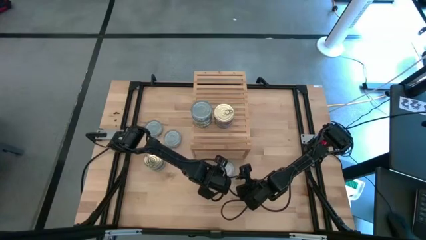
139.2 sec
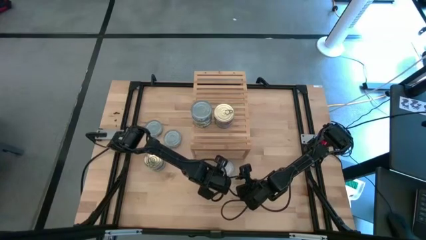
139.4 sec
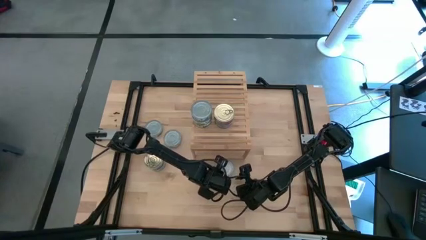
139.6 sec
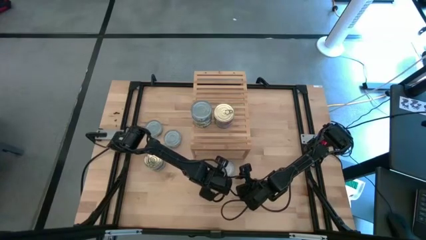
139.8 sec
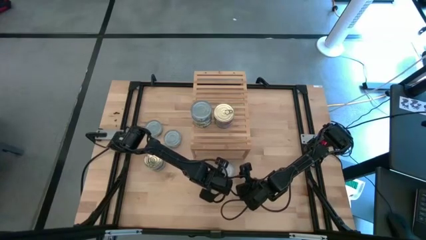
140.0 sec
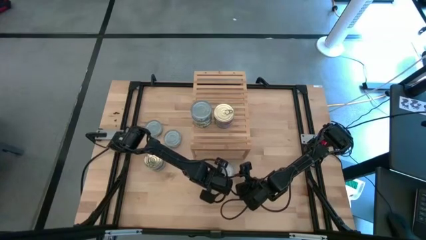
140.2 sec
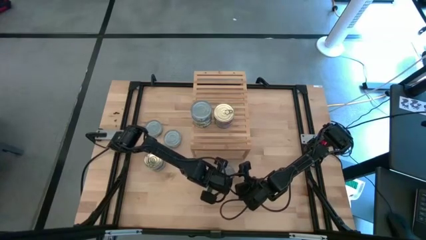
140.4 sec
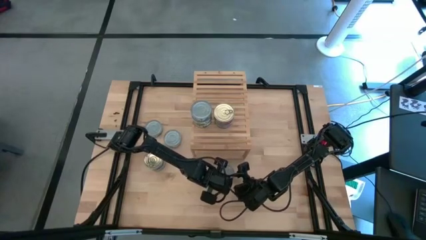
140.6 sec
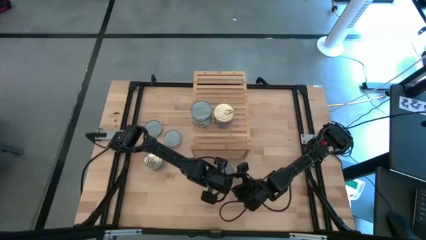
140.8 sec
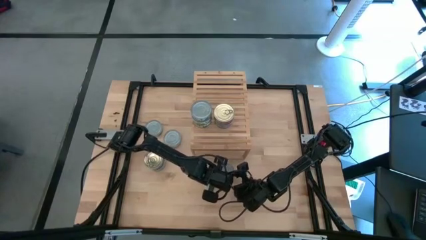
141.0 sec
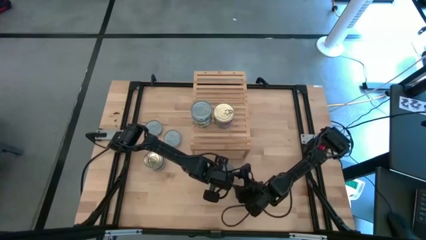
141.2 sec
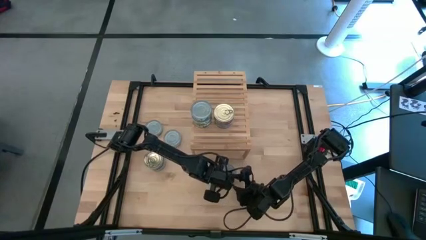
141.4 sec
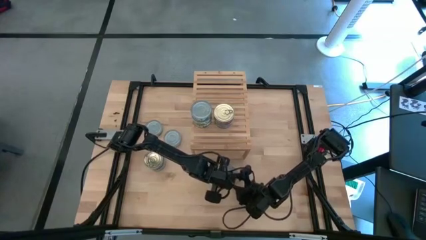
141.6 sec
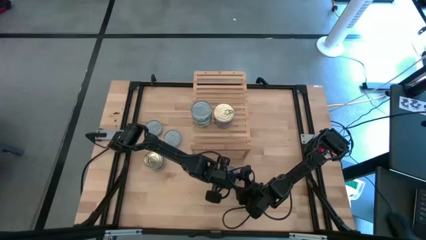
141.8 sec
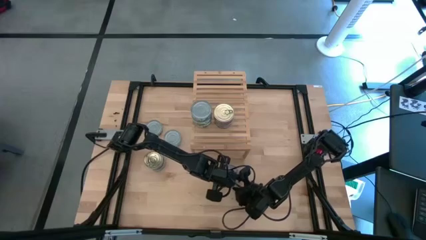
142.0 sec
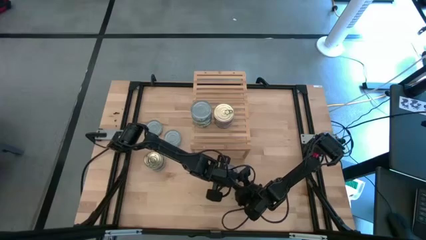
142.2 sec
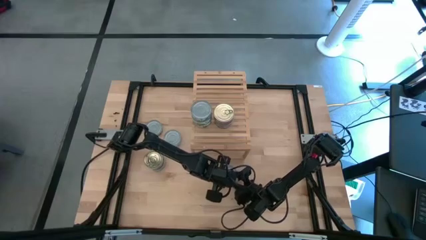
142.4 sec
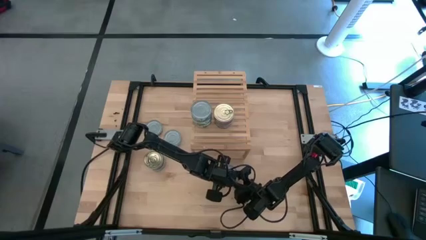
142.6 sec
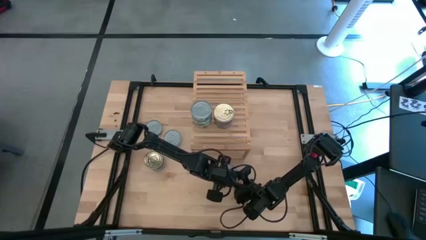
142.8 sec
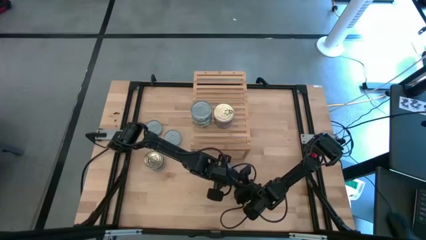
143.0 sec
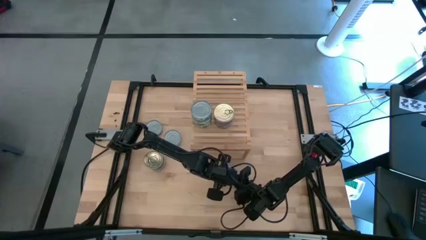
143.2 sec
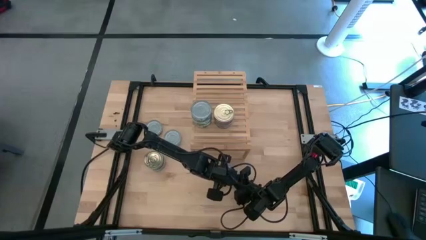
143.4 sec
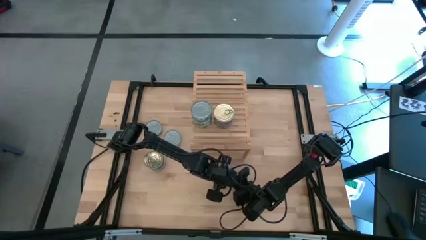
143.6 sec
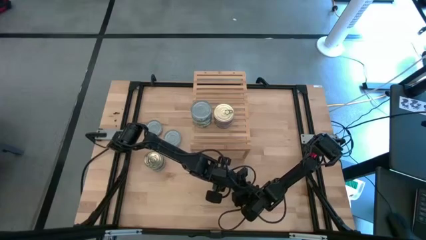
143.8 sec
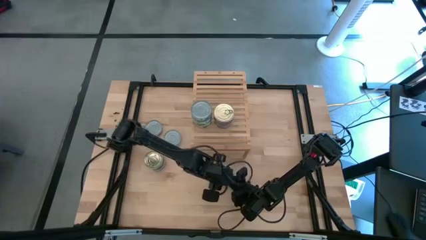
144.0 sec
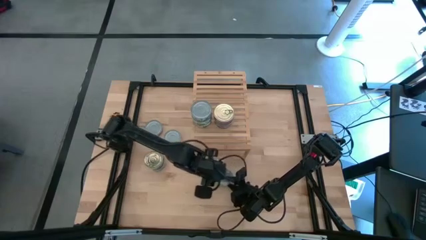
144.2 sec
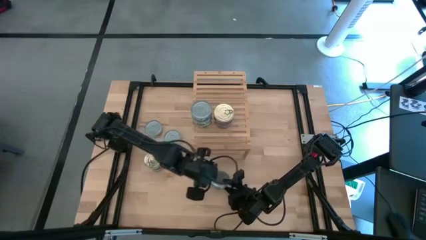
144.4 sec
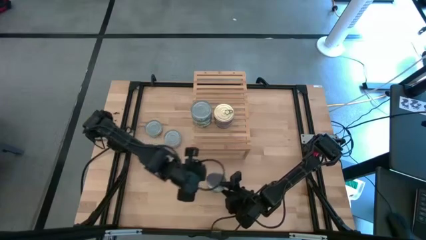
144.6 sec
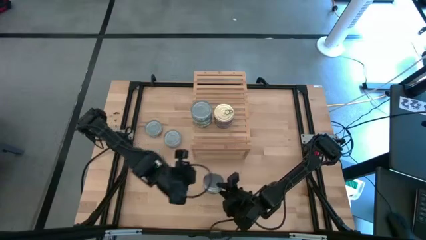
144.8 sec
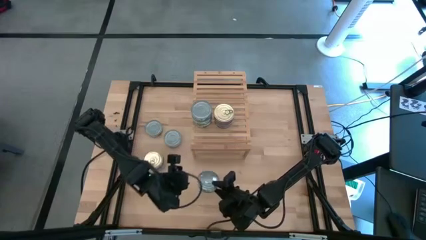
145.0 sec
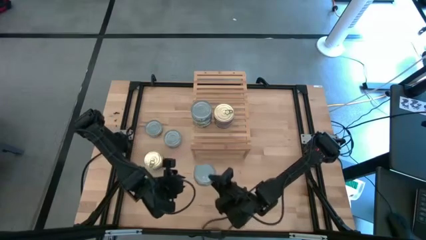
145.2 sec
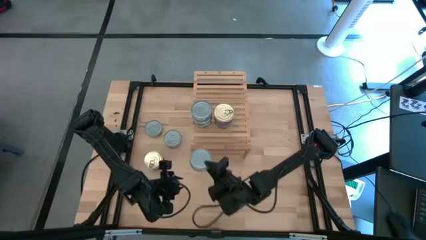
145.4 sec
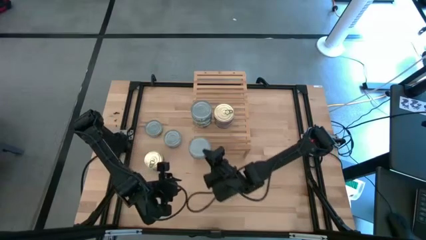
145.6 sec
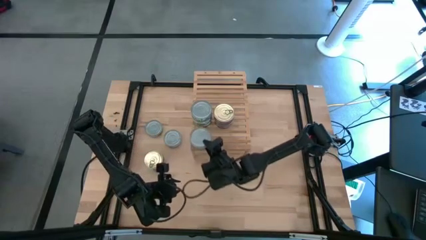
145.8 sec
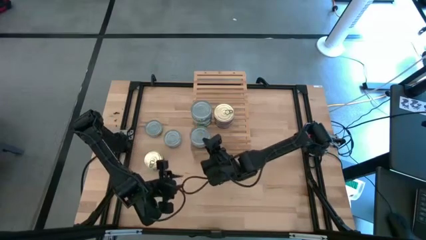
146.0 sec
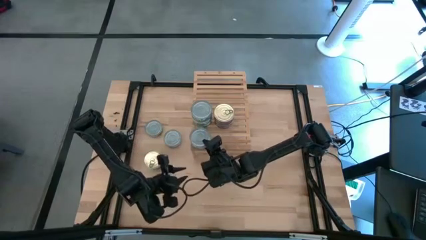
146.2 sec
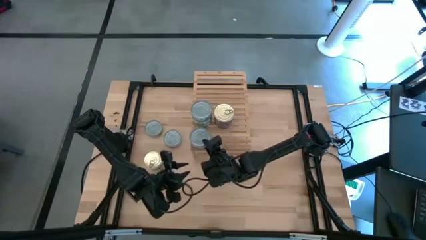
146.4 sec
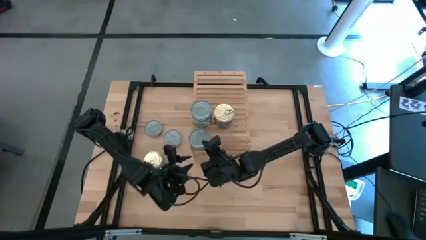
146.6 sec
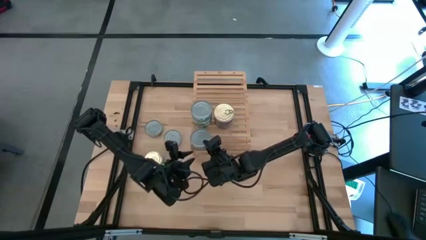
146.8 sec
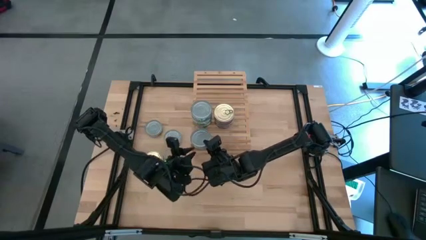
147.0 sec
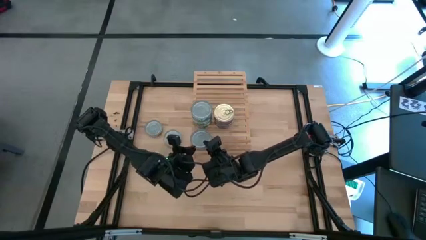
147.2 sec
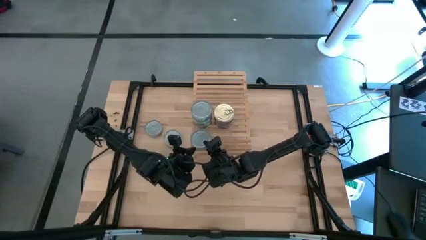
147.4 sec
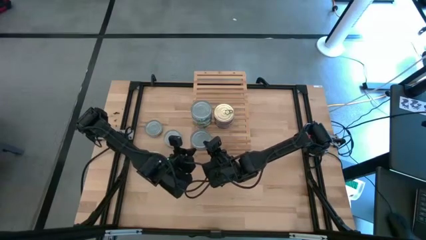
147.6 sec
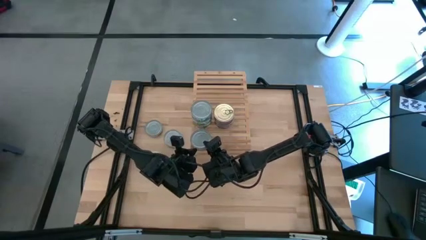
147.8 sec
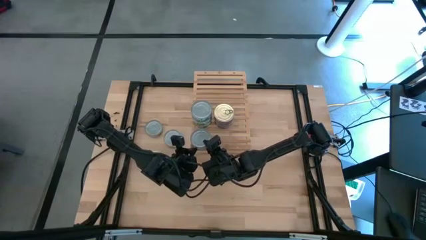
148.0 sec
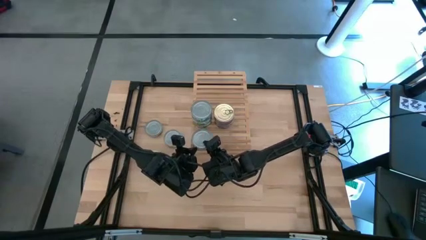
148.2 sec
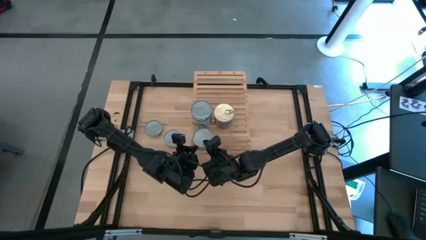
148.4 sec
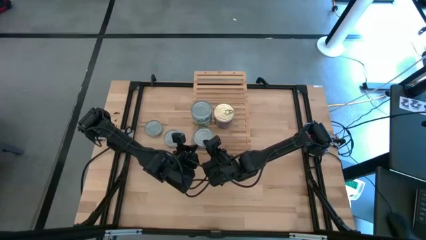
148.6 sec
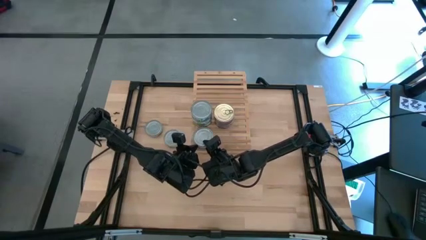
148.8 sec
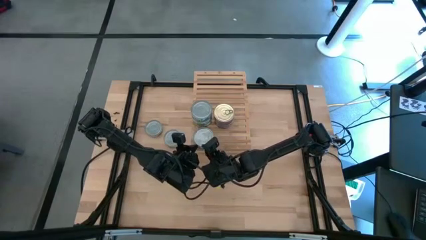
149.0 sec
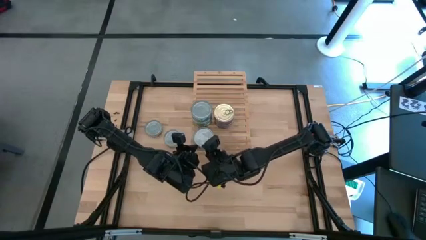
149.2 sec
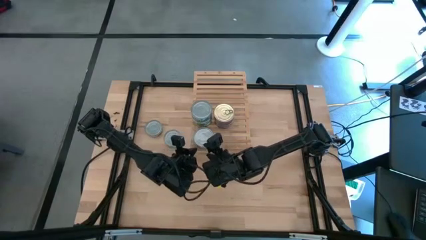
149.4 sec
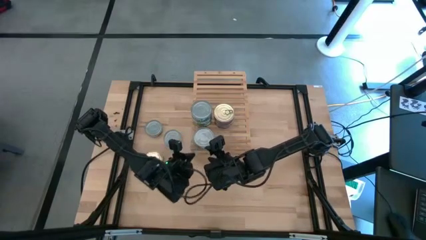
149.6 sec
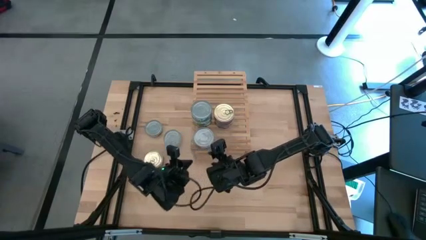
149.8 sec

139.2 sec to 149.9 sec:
Task: Stack canned seafood by type on shelf
Put the green tuna can on the shelf

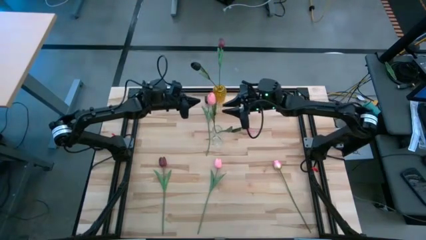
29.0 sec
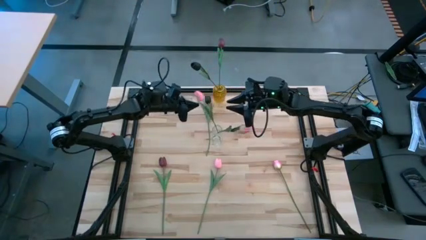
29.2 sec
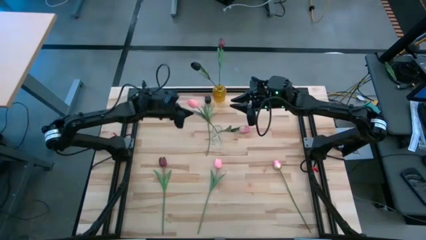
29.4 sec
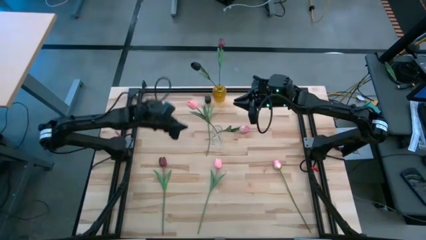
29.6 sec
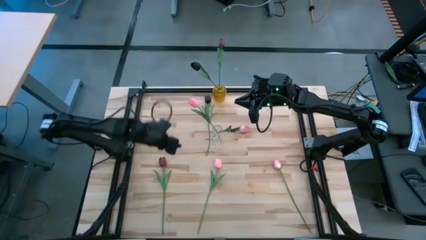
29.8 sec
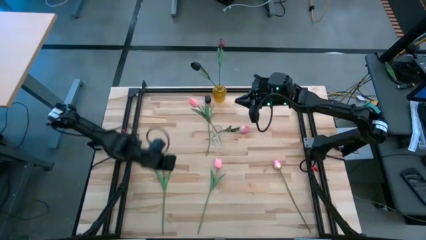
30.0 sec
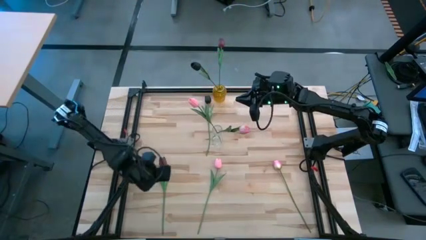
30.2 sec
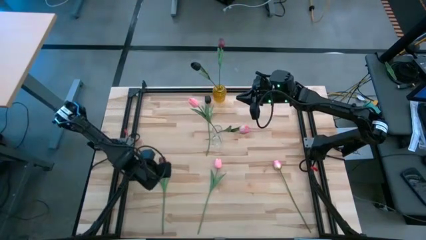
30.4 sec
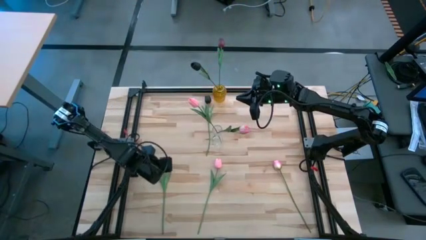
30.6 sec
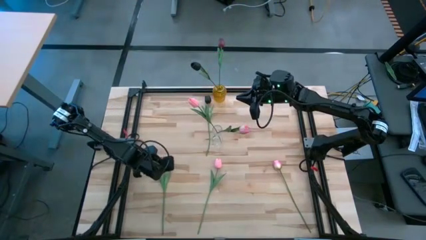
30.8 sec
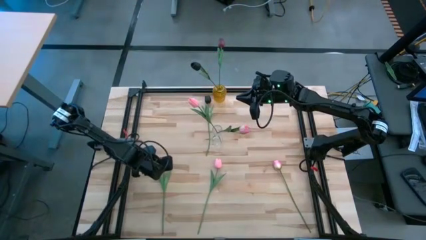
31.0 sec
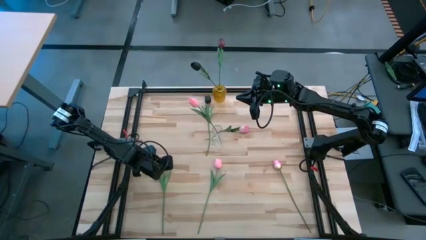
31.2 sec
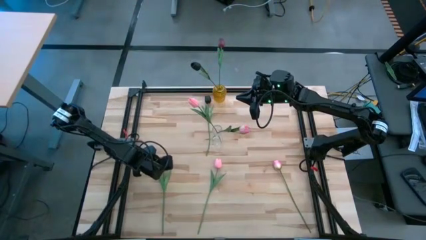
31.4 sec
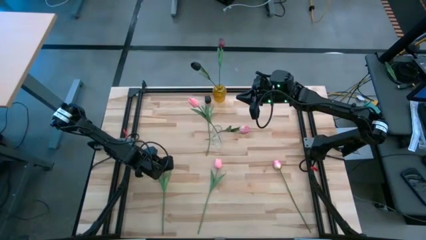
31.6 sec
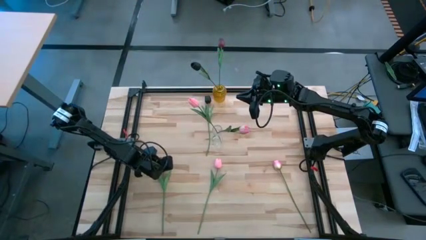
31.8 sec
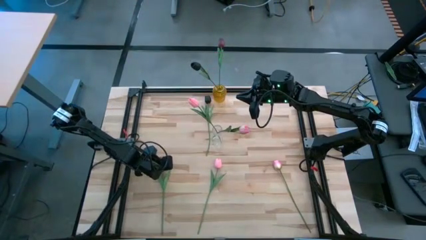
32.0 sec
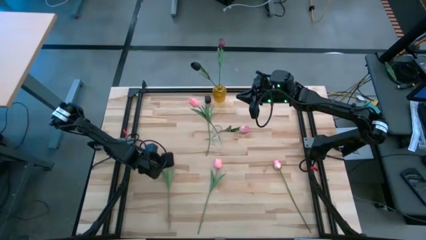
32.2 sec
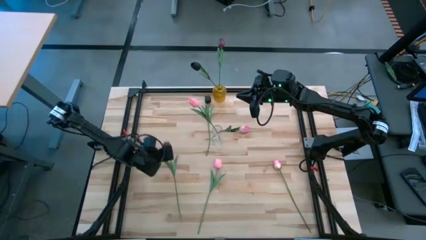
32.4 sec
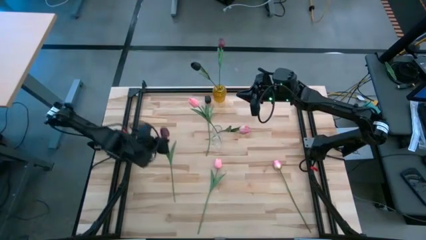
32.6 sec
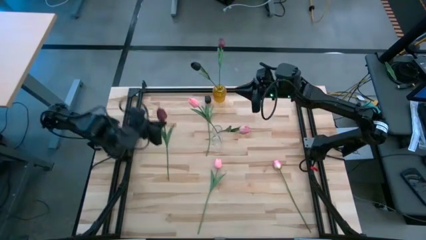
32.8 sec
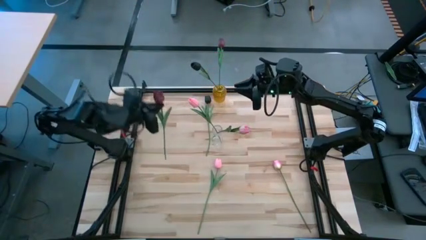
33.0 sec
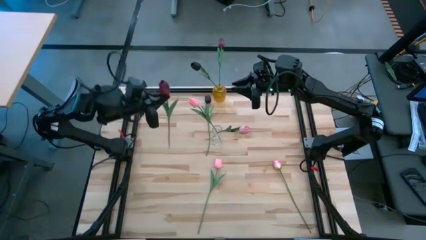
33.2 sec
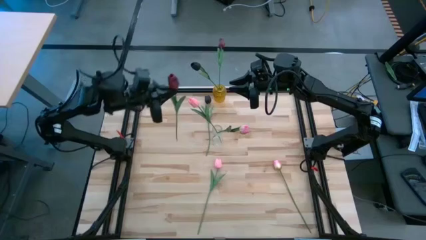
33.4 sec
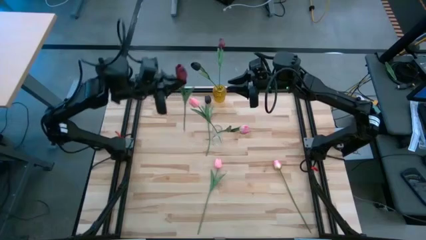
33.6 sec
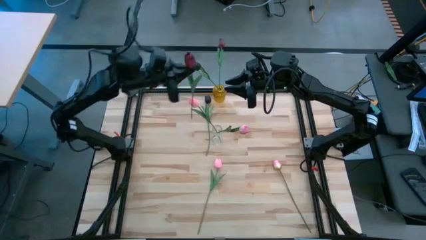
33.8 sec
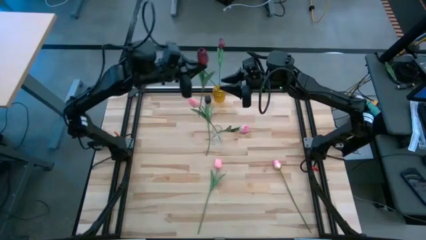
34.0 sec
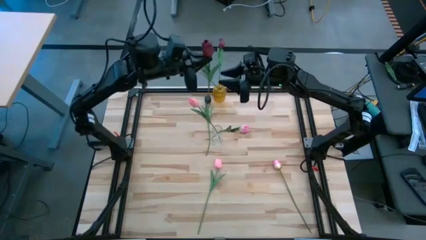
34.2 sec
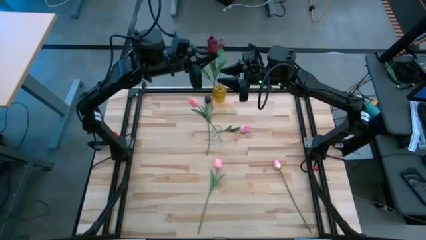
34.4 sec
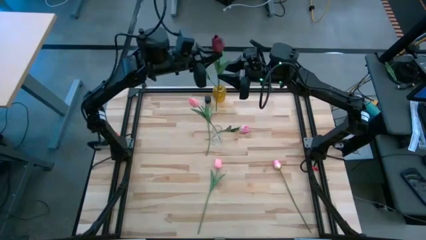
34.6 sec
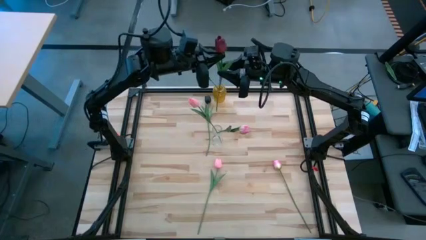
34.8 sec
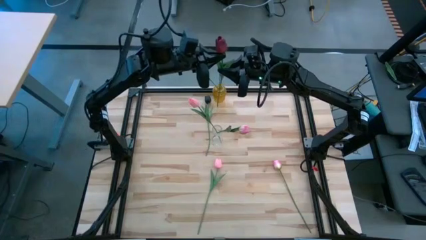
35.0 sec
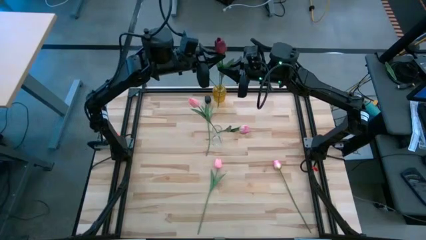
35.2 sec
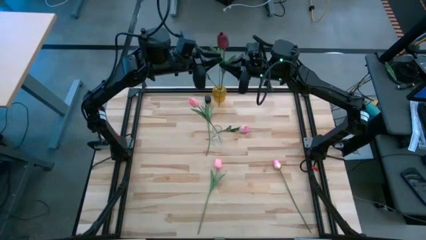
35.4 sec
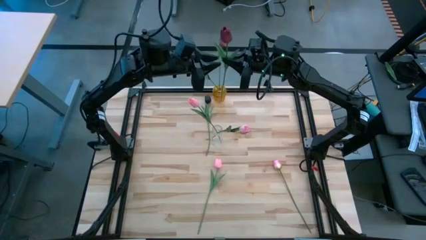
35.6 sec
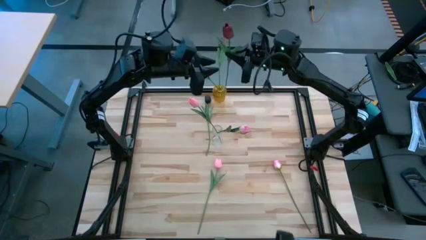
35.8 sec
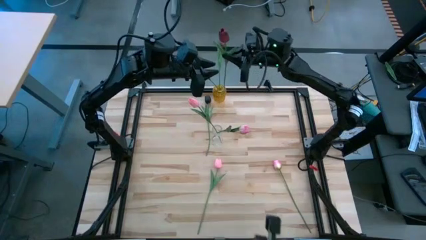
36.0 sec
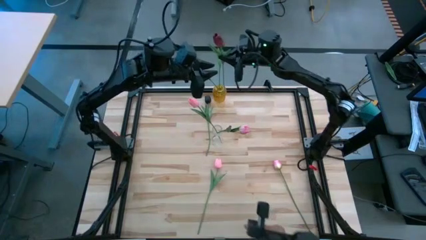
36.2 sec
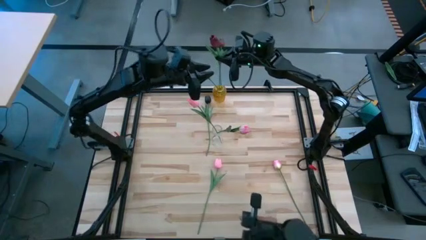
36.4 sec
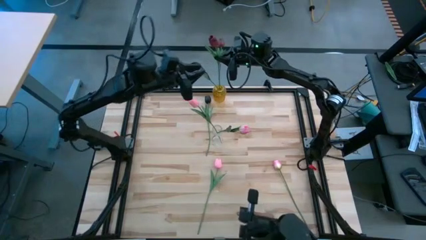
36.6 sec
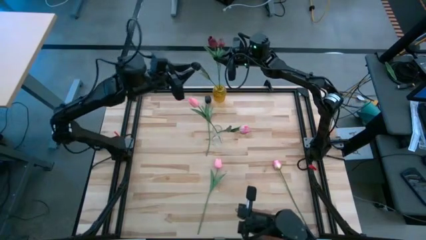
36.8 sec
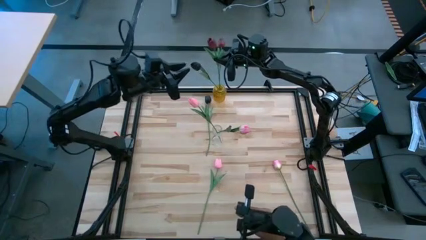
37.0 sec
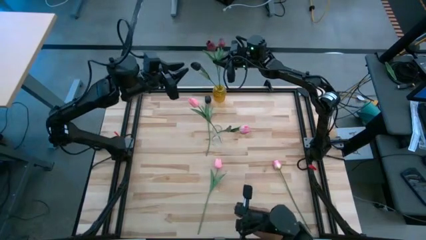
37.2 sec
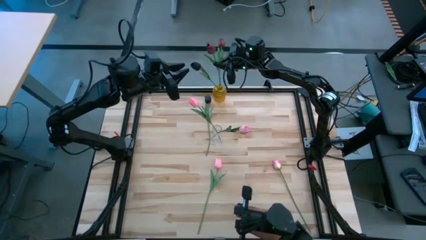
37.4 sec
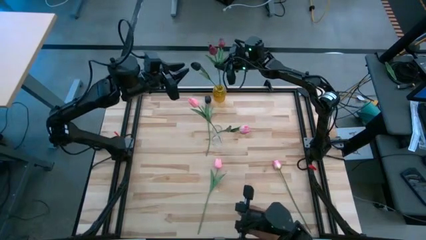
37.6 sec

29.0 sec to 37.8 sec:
Task: Sort flowers into vase by color
Put the red flower into the yellow transparent vase
